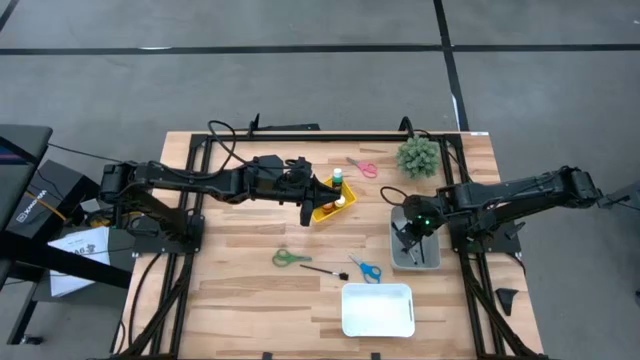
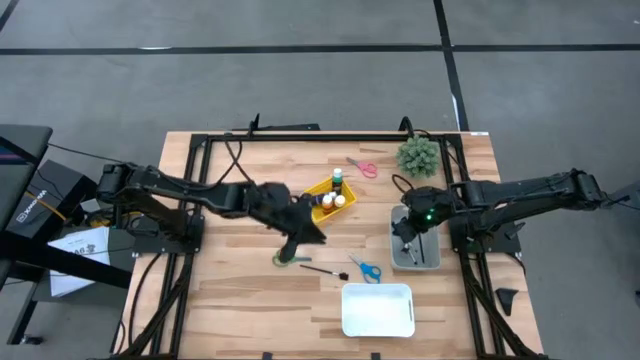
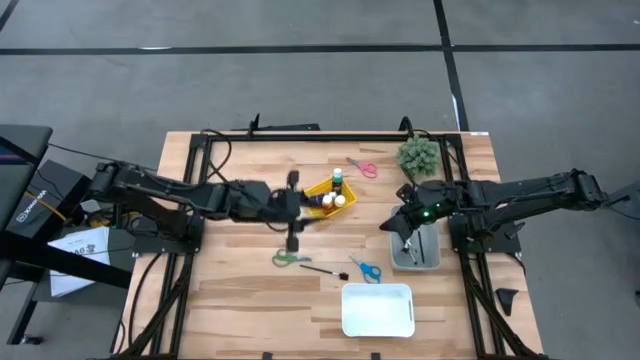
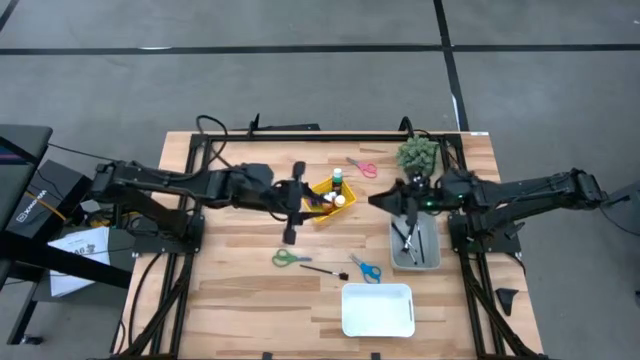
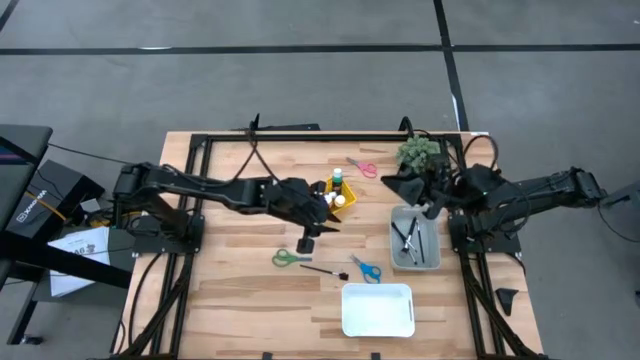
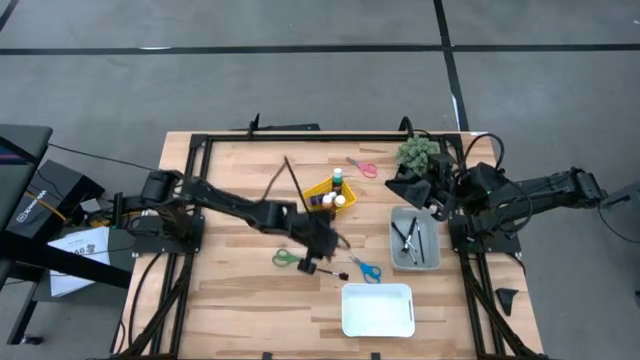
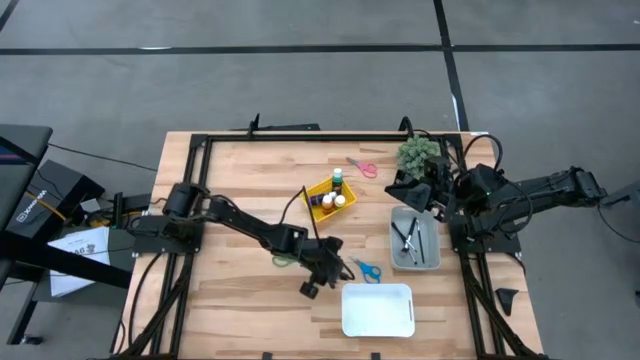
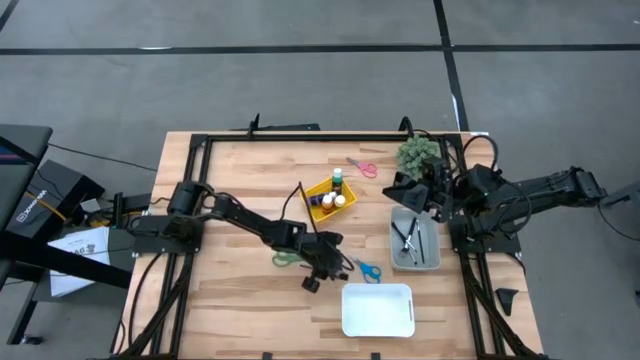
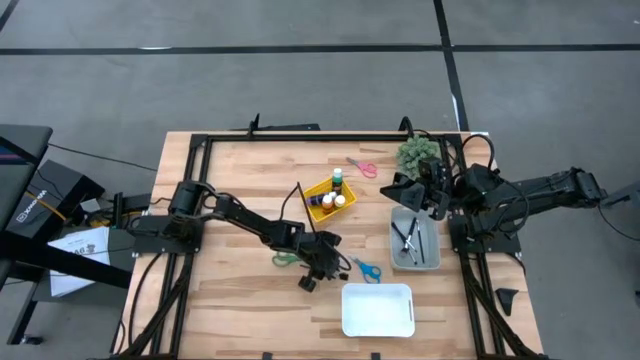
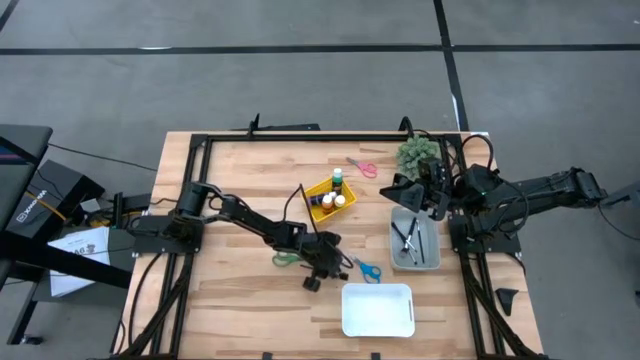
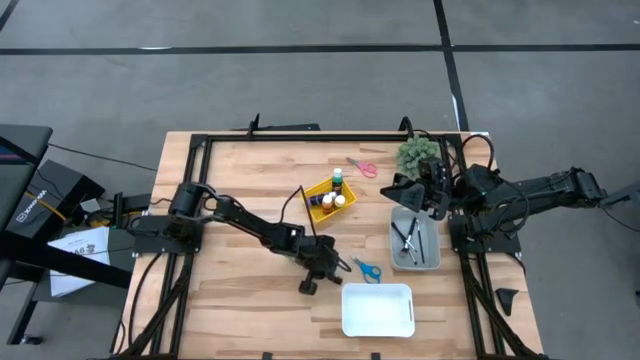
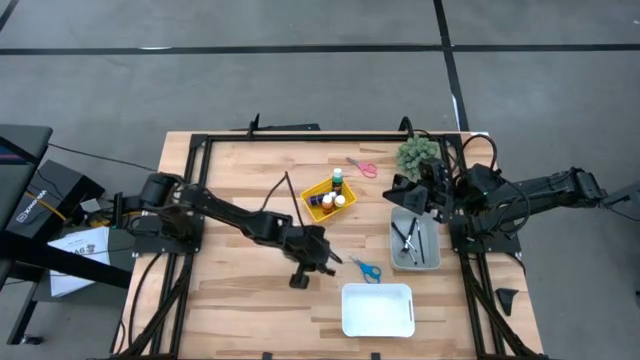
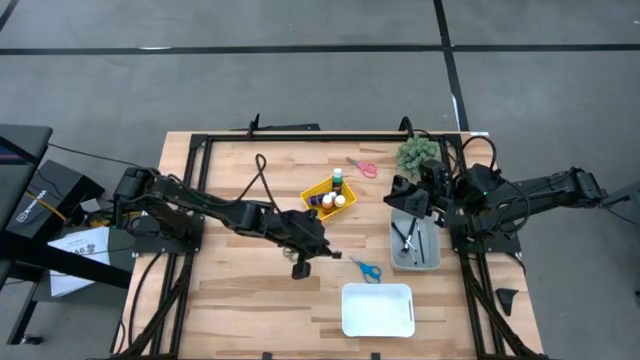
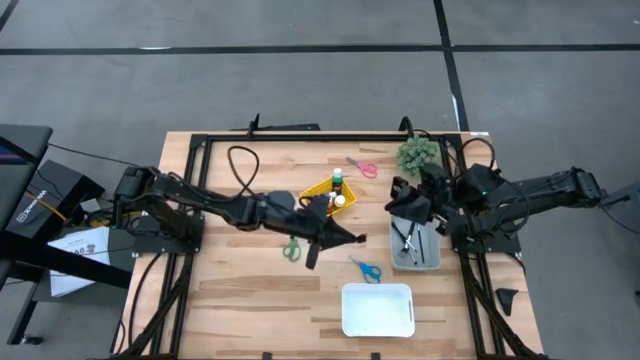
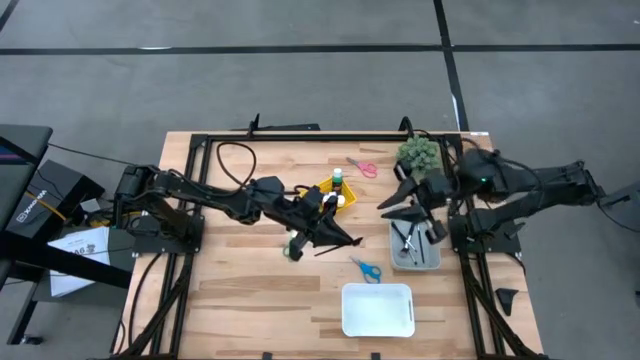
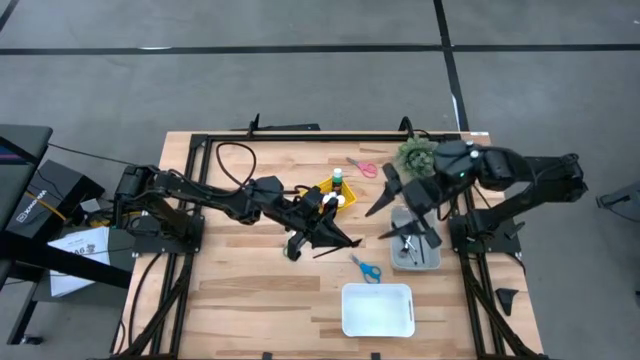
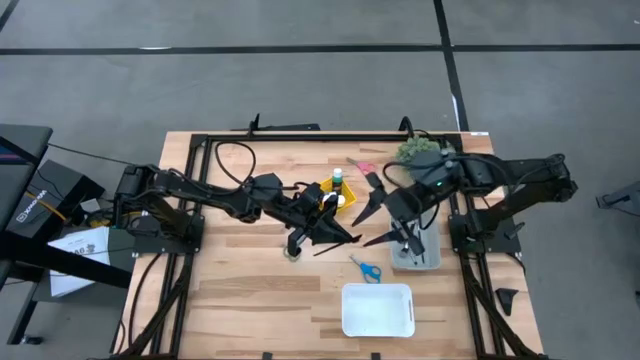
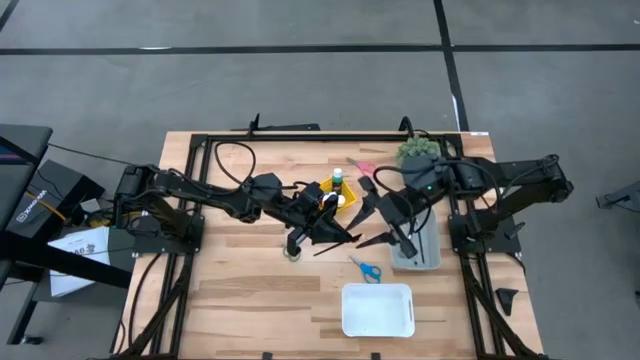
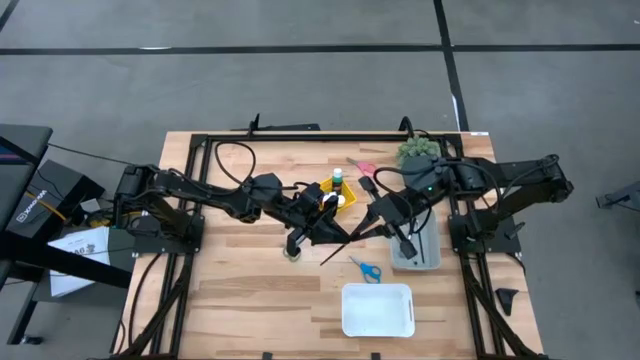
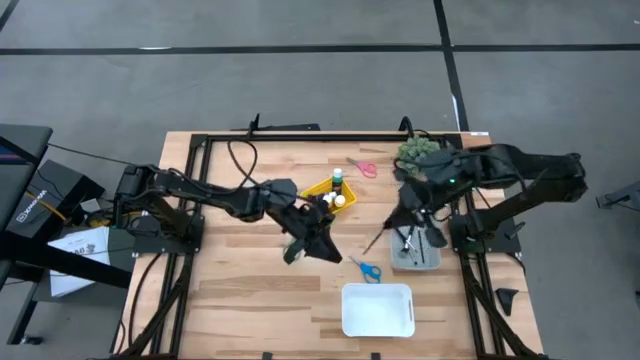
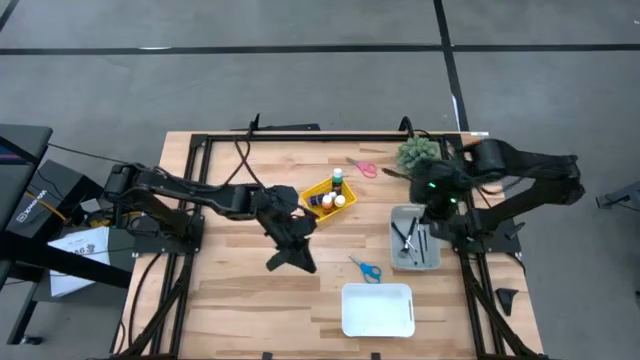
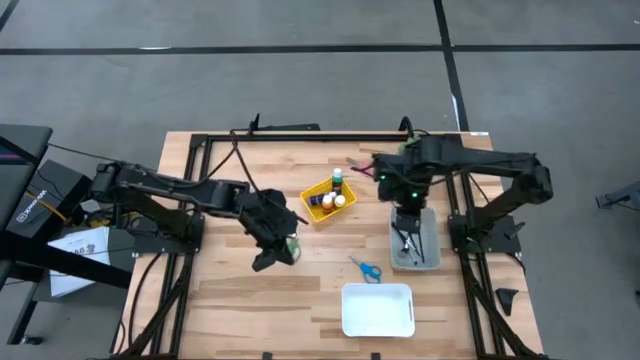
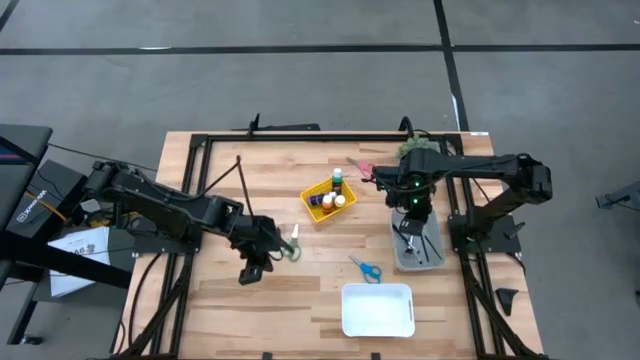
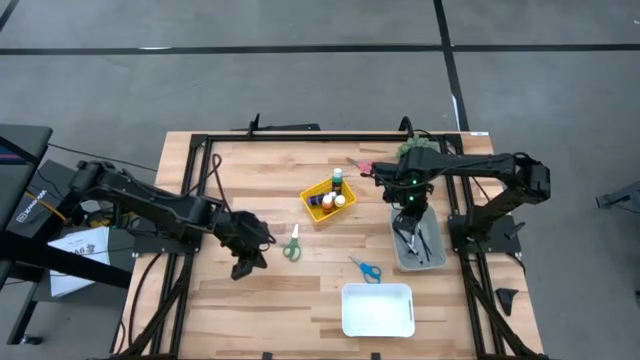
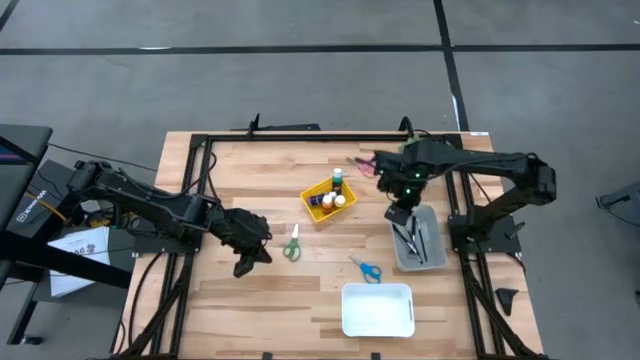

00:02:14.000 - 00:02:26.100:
Task: Pick & Place Paint Supplies
Put the black eye groomer brush into the gray bin
